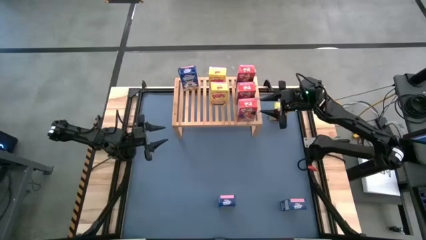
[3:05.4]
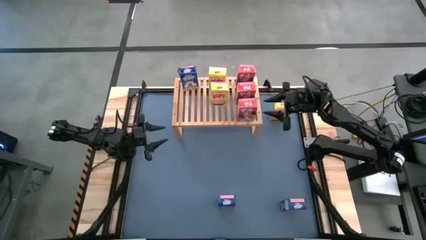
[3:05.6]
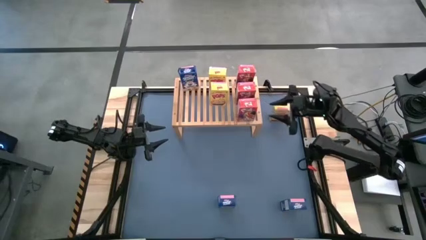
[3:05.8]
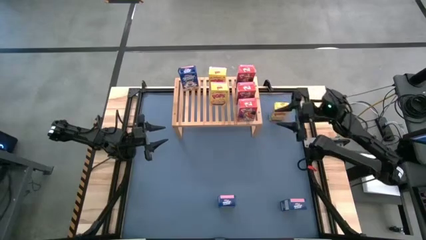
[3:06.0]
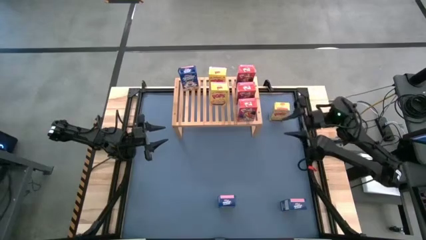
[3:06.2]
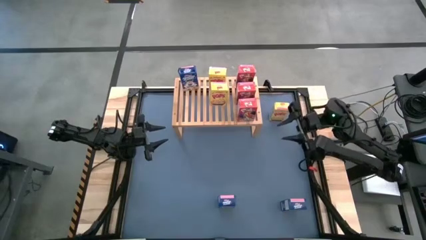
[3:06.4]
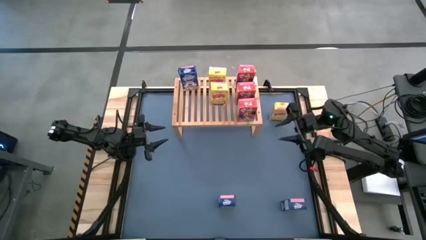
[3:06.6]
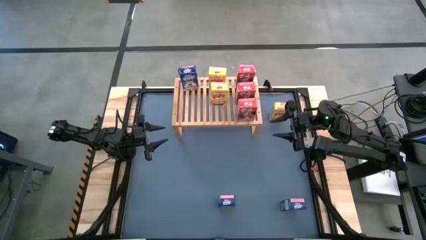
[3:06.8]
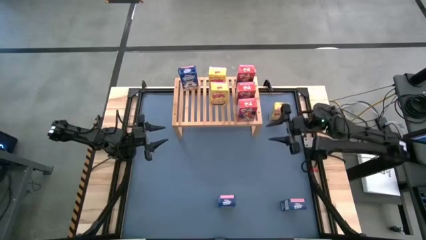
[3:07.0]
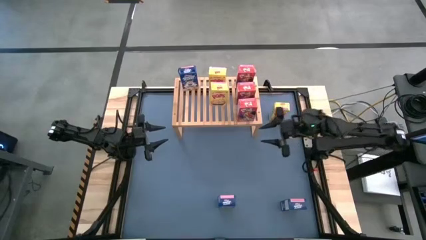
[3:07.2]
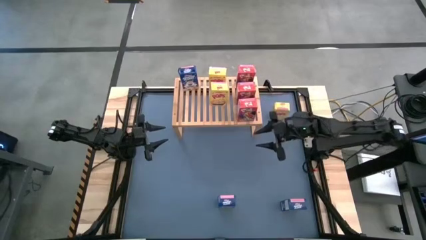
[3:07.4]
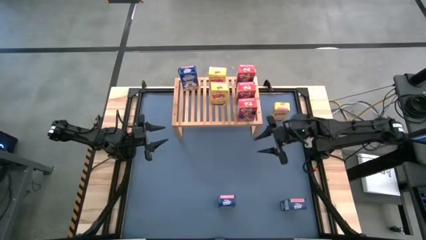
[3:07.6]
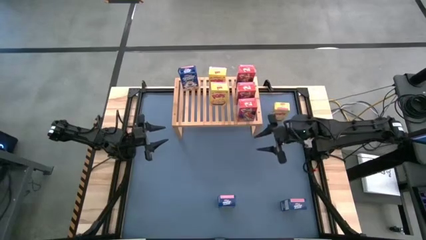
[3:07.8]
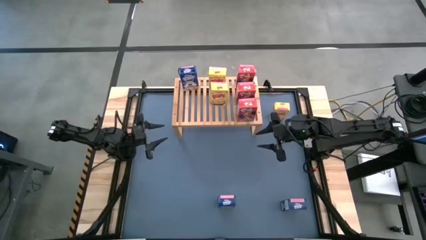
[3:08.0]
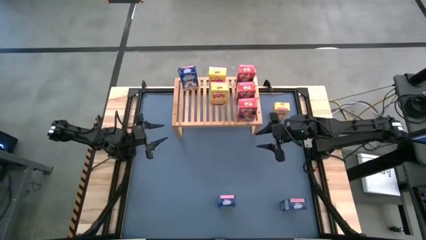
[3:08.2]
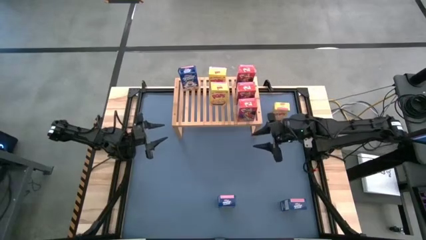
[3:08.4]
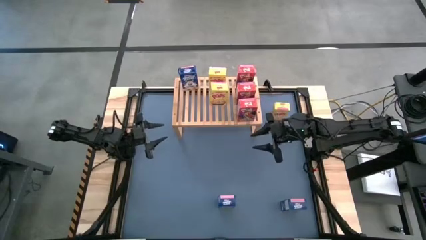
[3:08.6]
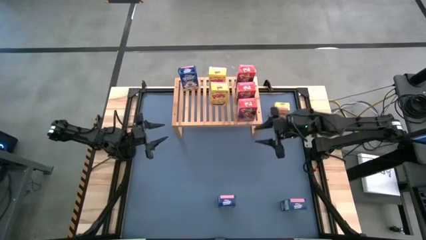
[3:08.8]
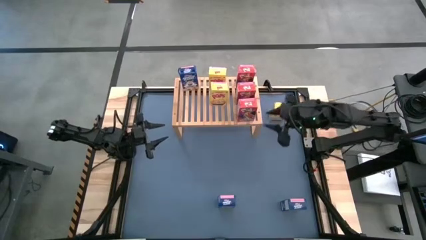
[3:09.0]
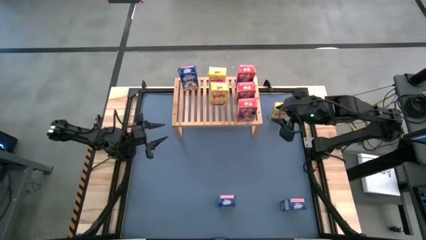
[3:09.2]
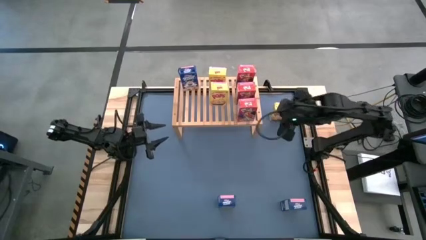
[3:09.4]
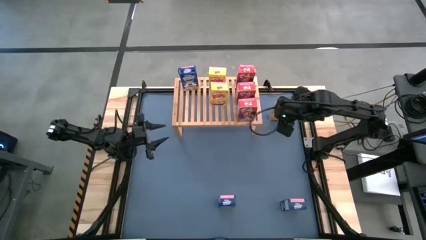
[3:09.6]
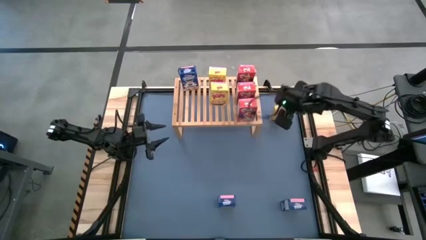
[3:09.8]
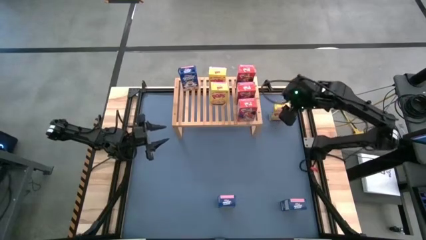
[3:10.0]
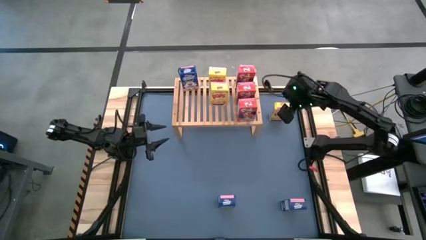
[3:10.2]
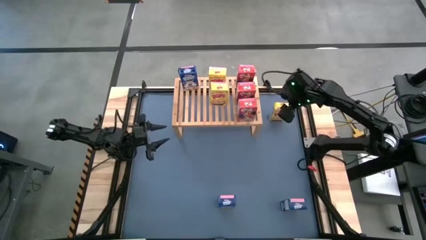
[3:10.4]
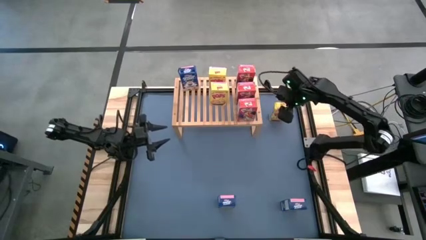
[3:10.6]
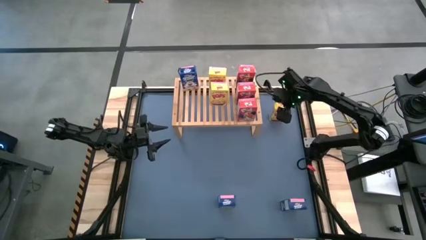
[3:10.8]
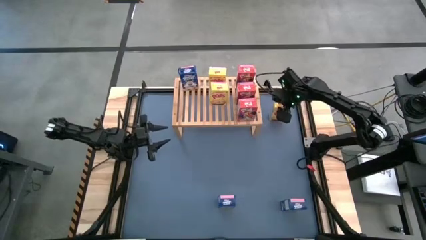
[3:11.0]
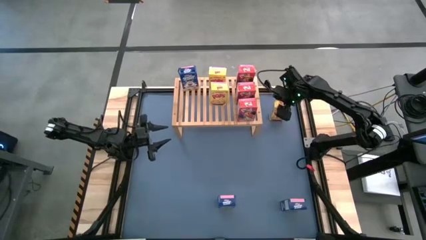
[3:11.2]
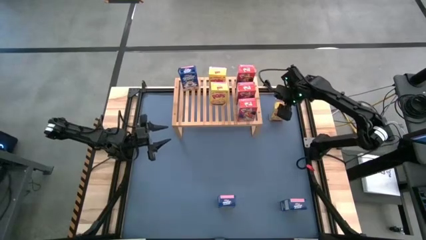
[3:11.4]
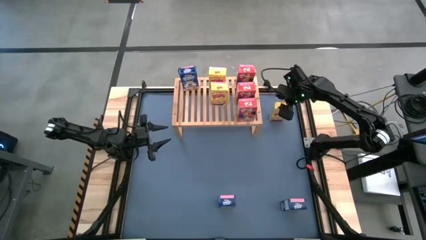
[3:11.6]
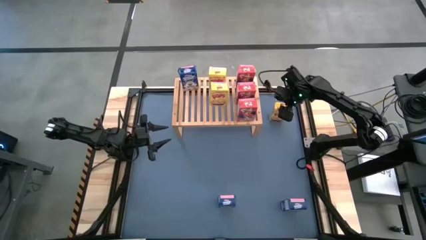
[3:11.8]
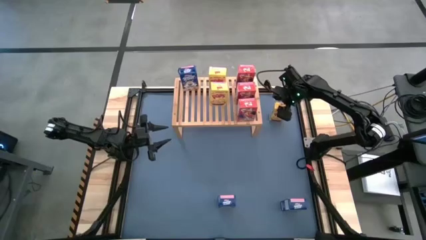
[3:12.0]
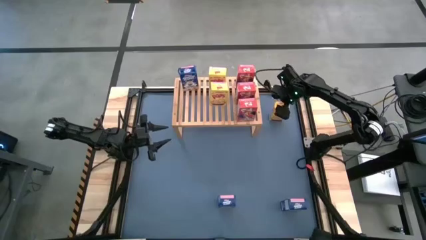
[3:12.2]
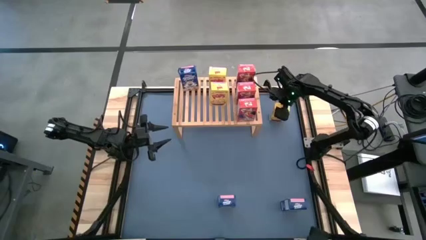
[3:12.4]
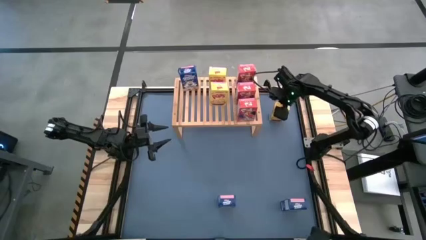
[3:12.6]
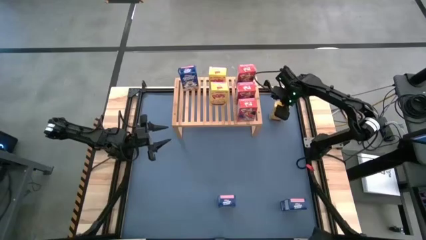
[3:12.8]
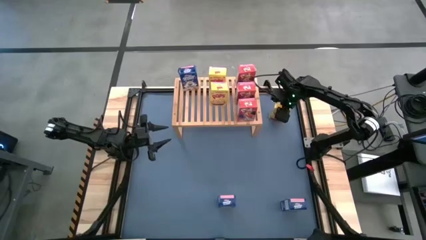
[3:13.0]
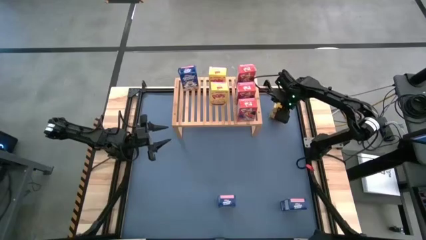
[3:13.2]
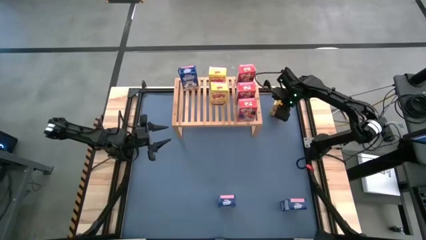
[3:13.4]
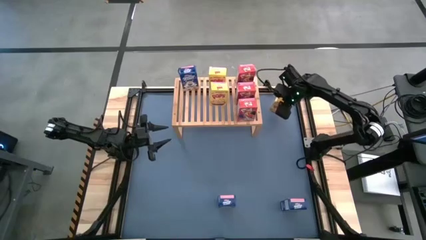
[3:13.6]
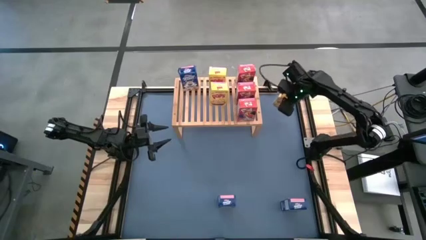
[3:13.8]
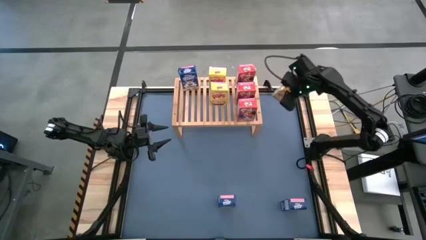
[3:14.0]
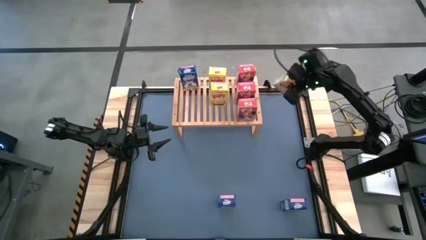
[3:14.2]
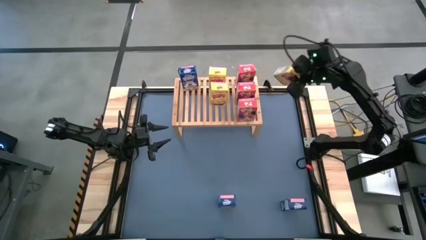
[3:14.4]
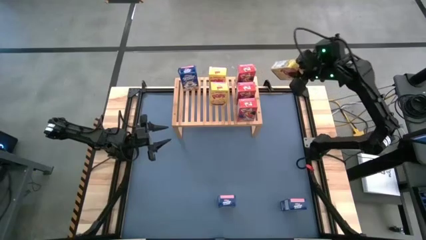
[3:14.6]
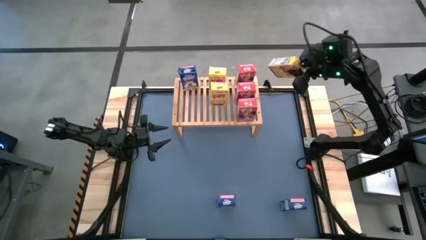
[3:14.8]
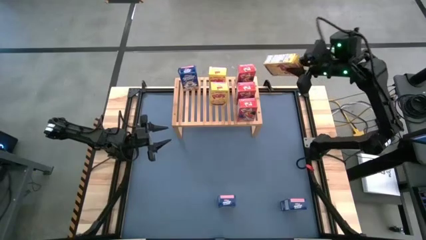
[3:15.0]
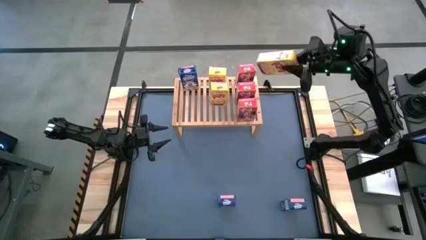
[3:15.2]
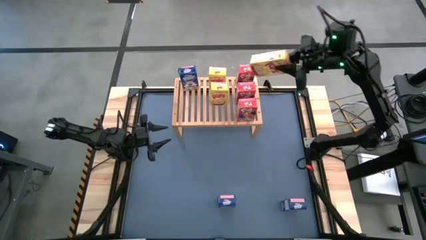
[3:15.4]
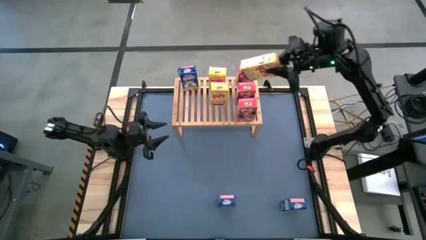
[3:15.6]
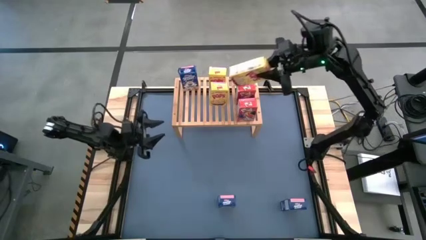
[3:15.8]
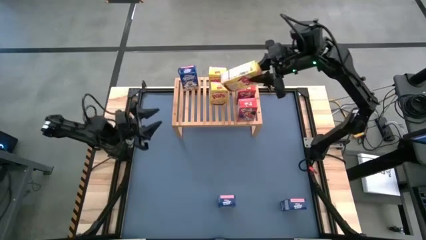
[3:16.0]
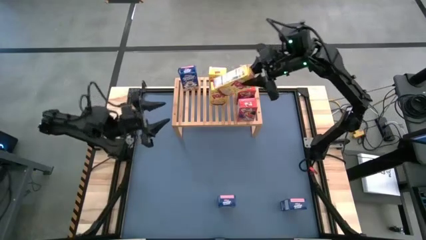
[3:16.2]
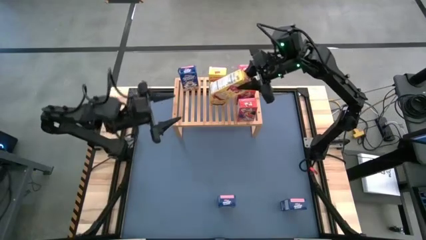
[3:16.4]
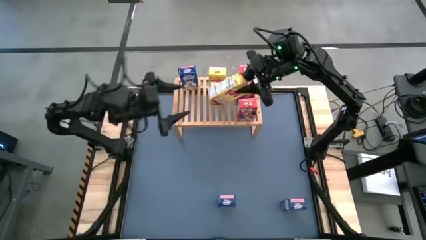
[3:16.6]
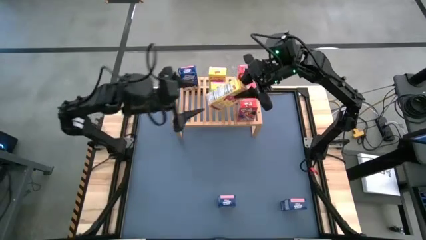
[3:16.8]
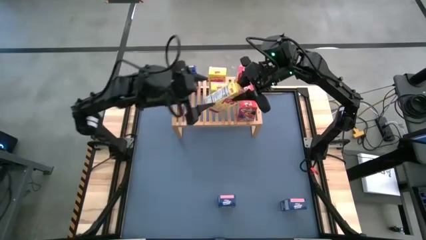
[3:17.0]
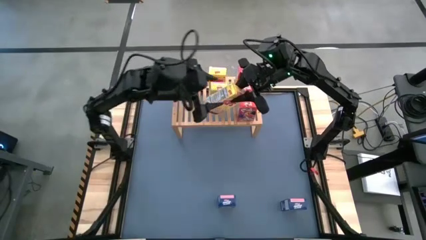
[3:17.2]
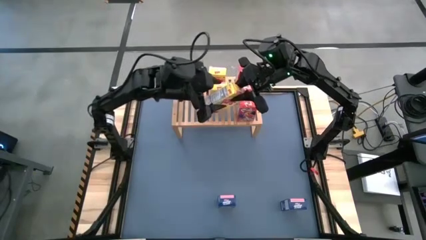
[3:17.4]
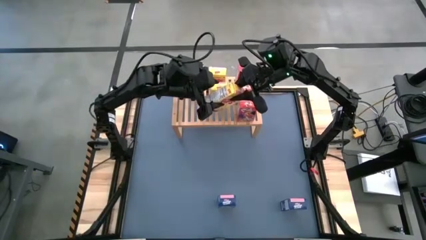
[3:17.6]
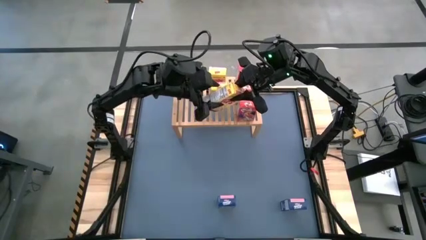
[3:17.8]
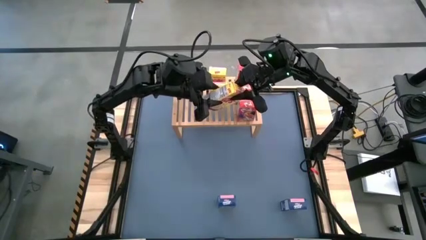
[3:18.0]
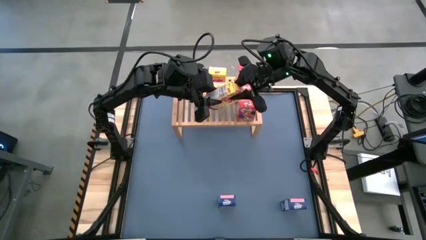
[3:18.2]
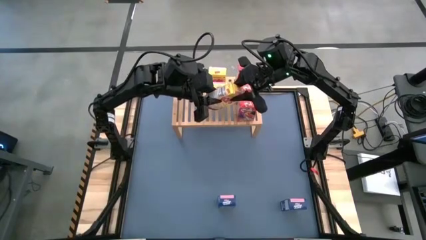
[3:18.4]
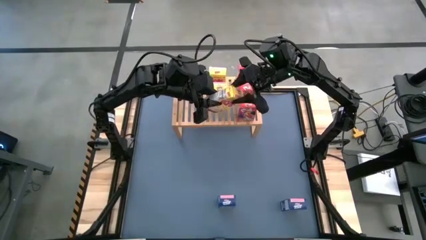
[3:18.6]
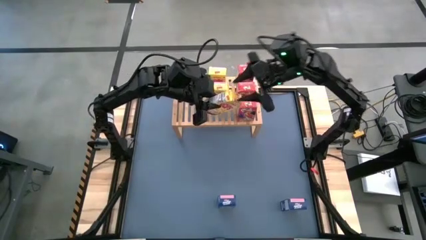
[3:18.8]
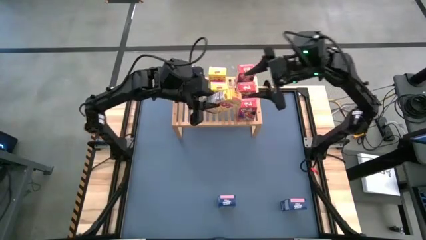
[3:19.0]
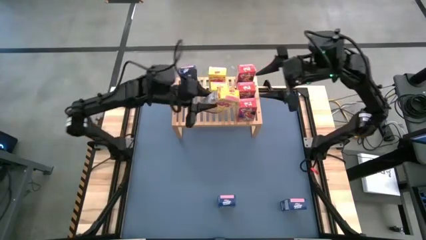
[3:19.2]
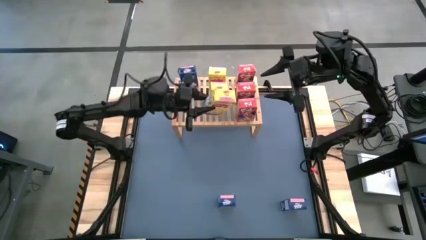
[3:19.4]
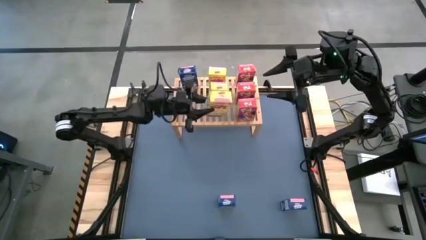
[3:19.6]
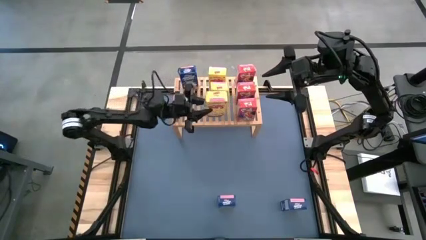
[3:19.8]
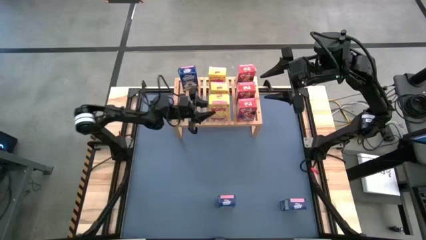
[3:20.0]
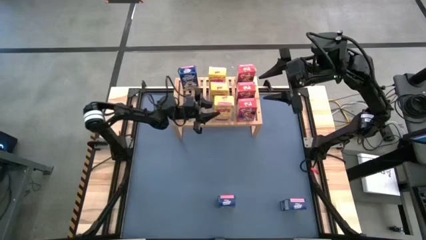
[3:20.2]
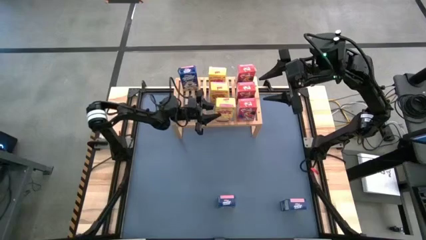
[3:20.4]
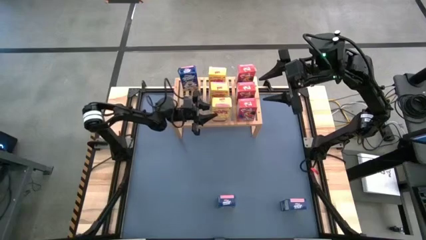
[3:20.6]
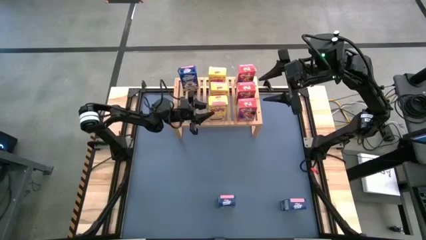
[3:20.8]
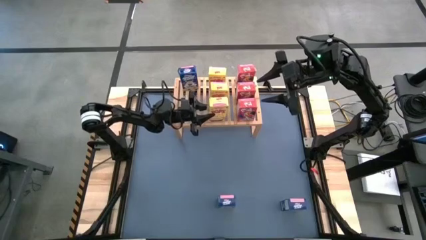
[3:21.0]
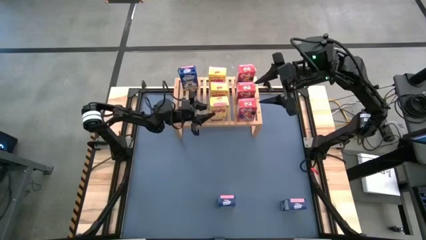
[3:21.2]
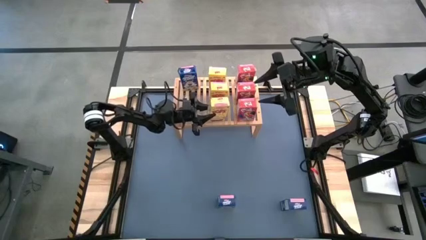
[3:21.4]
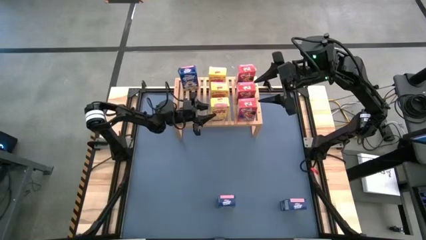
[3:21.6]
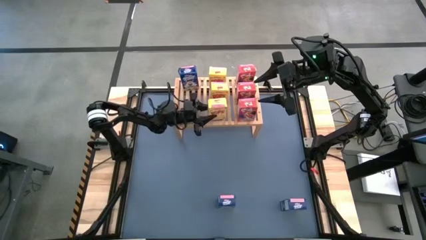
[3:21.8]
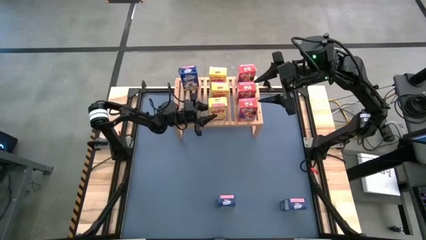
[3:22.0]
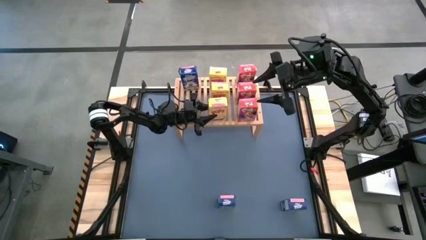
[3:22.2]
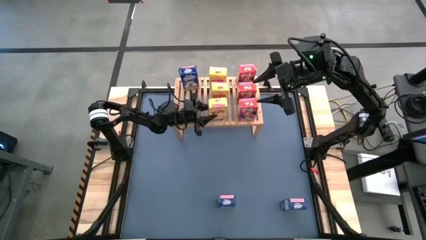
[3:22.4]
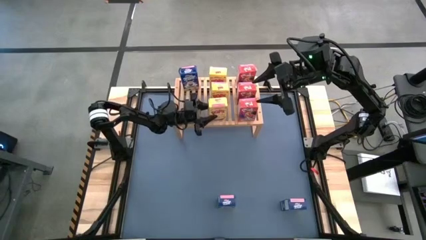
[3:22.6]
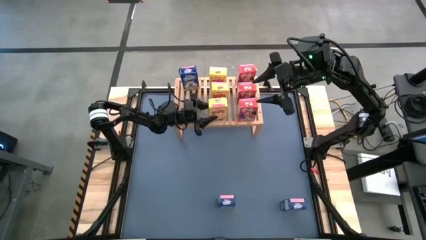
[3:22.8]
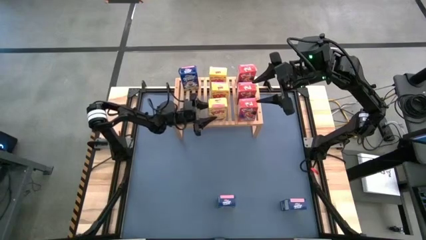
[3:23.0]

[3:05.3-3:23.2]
Task: Stack cereal on shelf
Put the yellow cereal box on the shelf aligned with the other yellow cereal boxes
